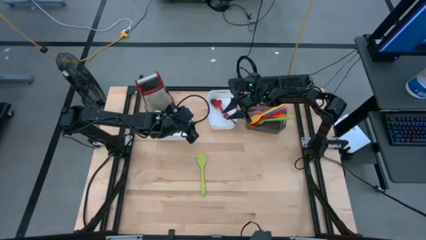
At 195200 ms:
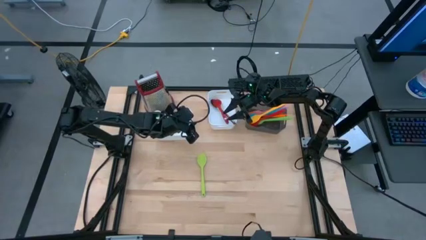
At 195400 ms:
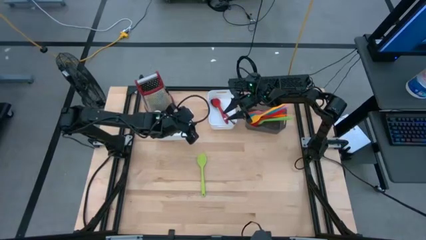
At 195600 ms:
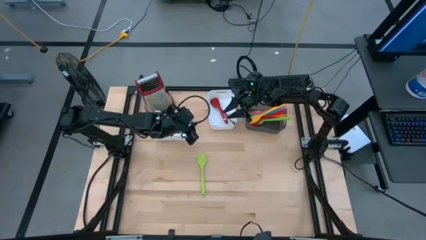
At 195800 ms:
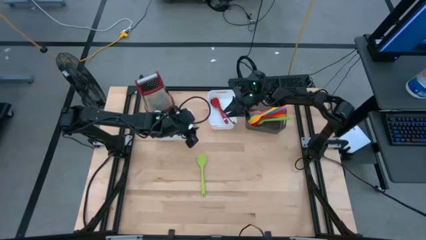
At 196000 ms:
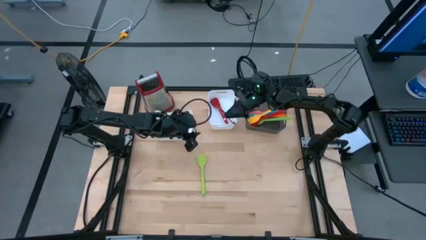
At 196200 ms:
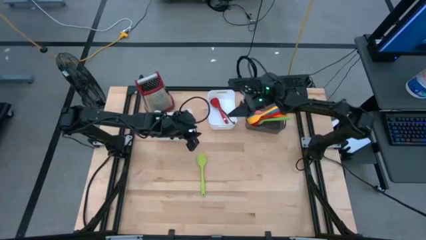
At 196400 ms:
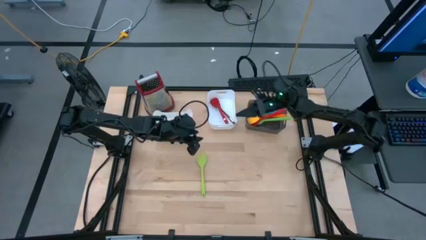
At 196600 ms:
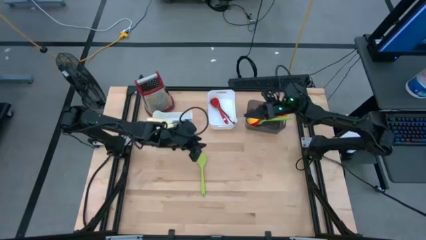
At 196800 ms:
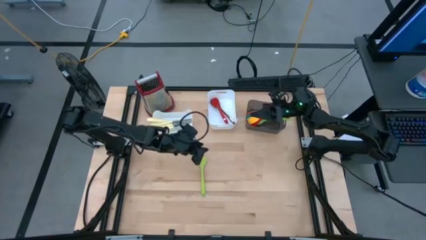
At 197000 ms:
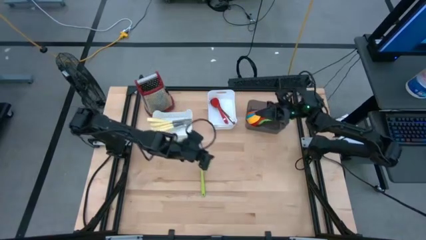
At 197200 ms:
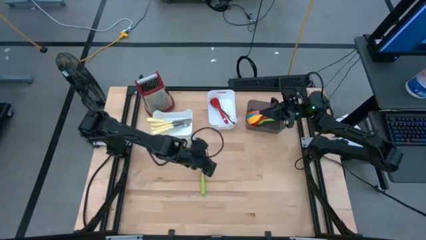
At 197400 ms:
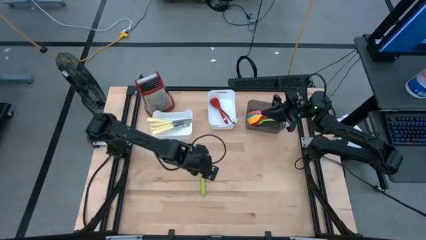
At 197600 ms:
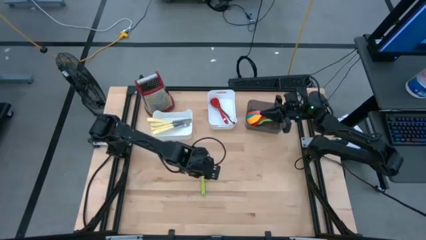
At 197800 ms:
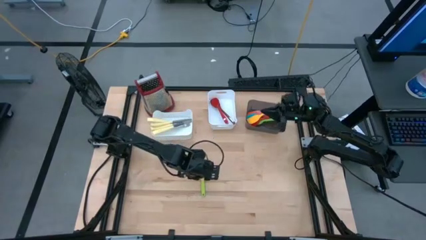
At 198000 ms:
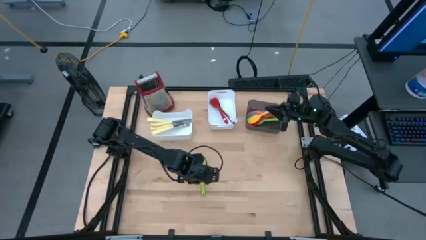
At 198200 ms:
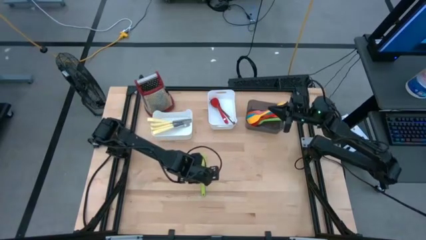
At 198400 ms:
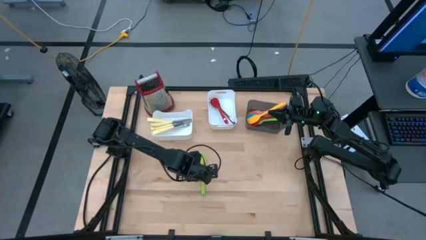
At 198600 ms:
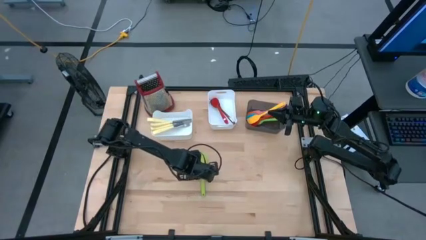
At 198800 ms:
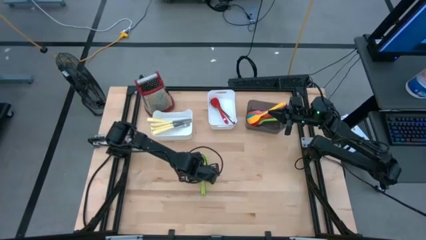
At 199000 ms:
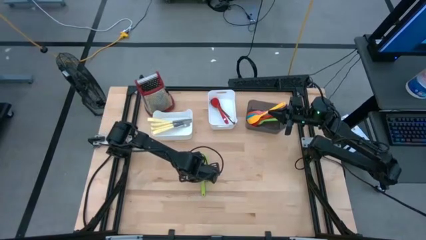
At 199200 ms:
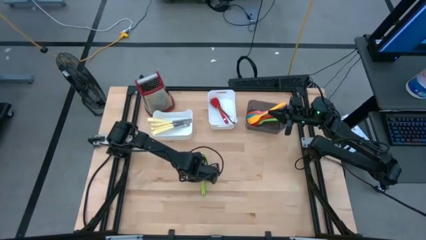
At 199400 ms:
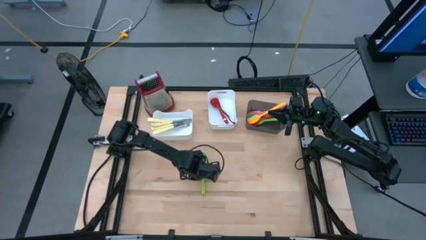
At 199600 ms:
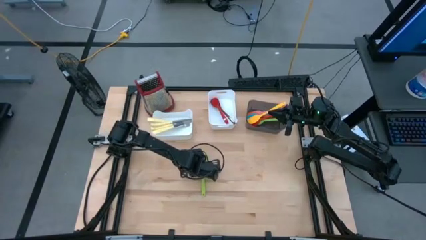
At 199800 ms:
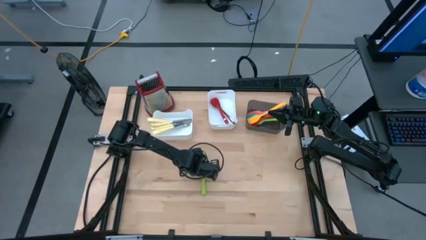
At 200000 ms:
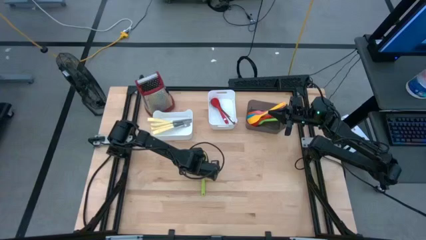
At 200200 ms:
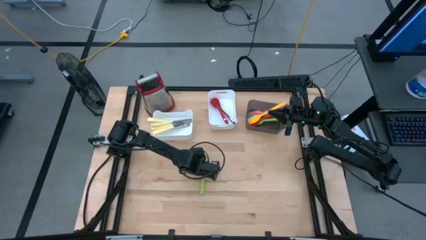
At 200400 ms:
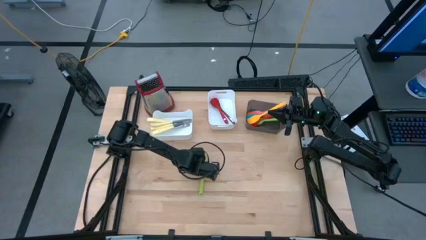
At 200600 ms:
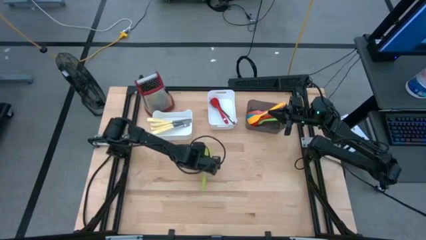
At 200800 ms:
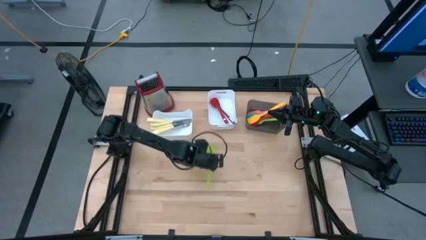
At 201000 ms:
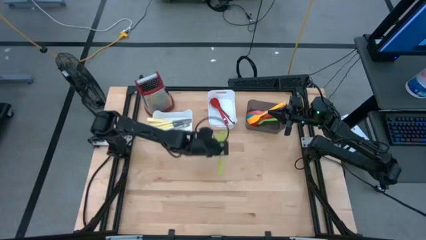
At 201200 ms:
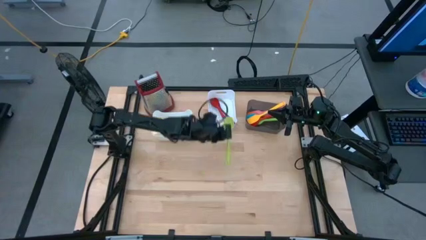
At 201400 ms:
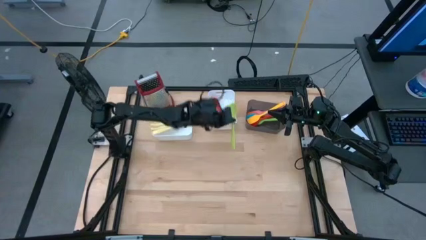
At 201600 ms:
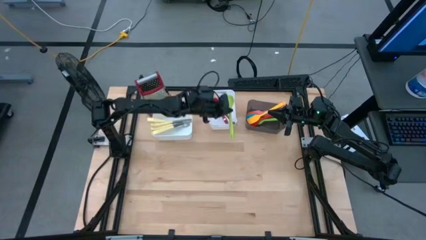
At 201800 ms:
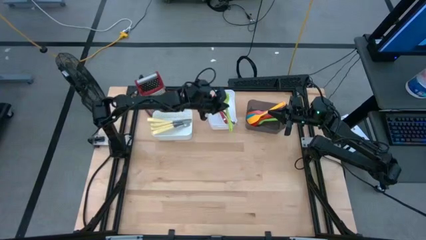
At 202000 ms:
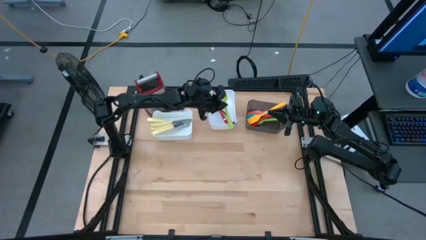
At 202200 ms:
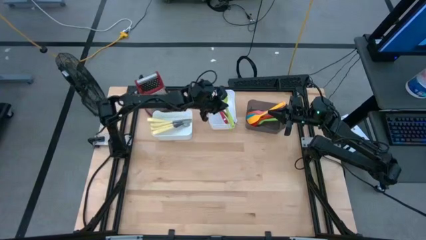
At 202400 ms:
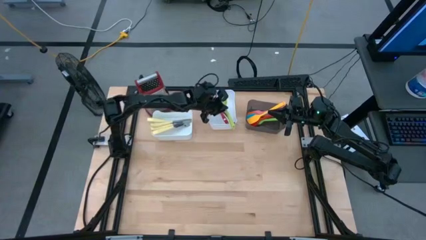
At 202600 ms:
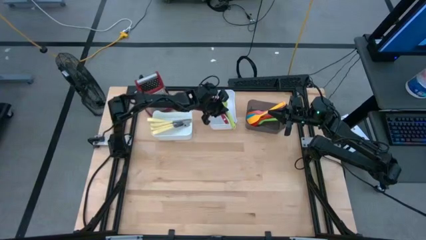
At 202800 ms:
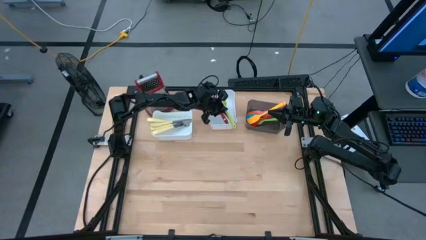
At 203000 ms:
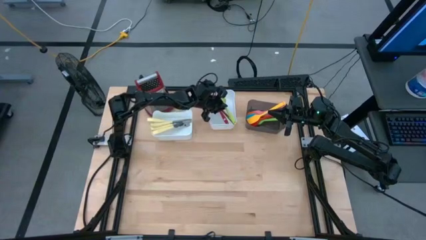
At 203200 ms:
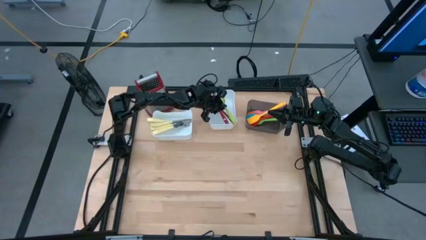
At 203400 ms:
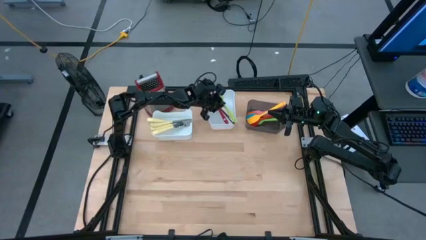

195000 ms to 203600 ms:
Task: Pick & Place Kitchen Items
Put the green serving spoon into the right white bin
